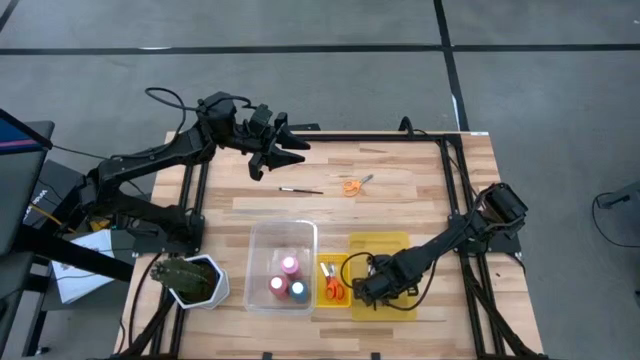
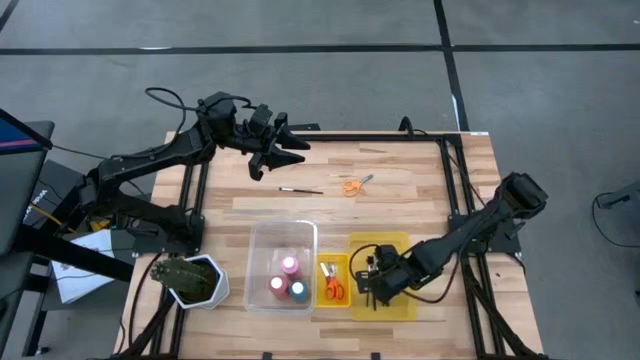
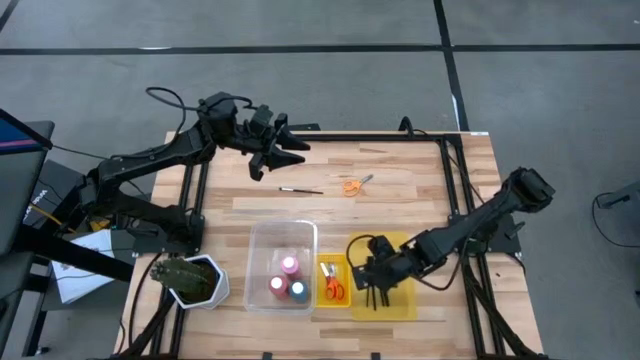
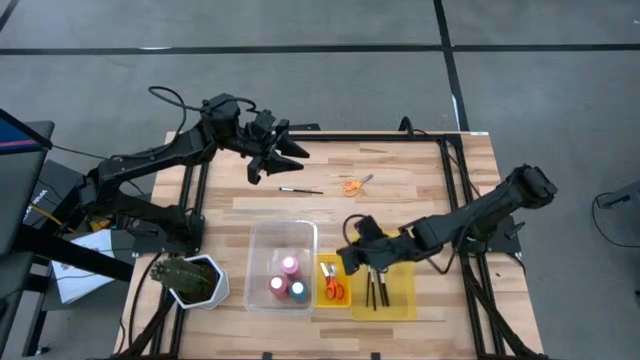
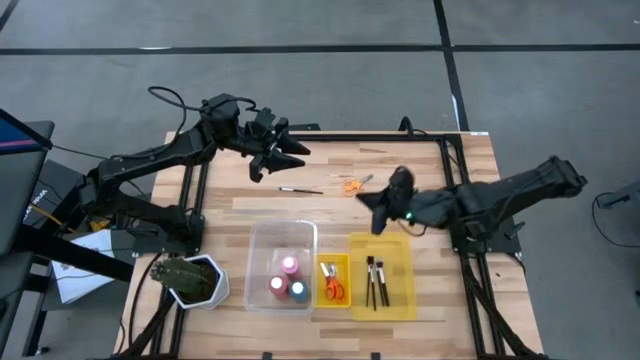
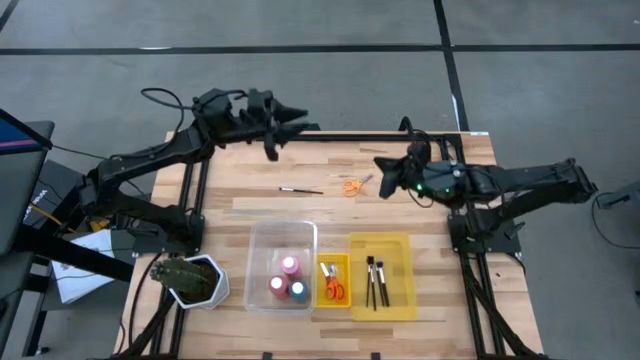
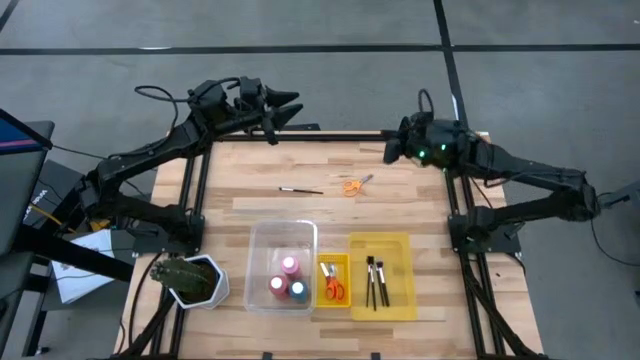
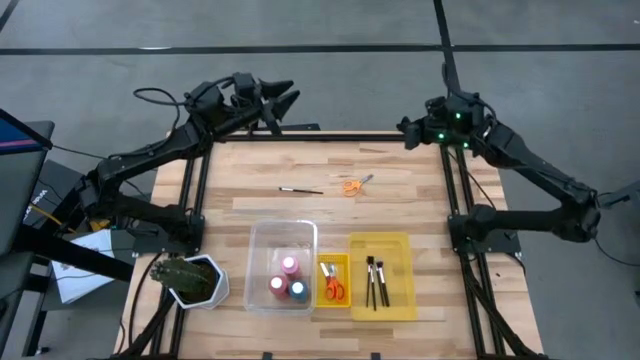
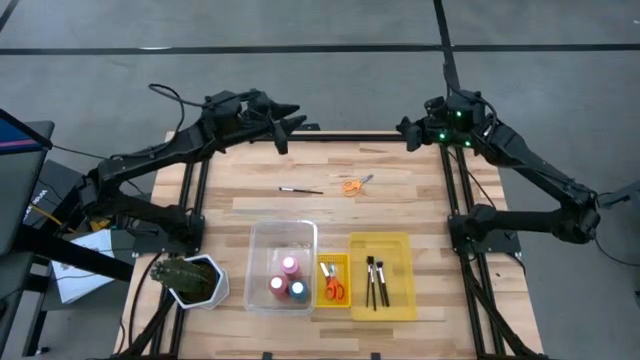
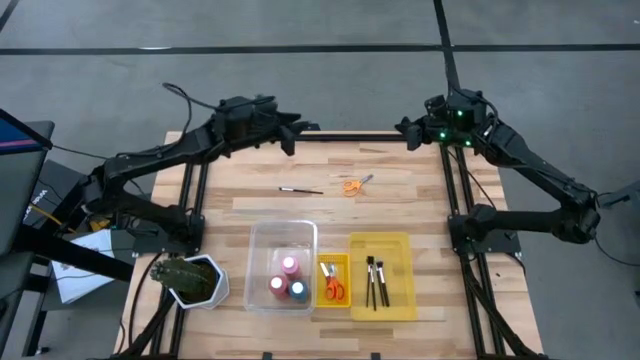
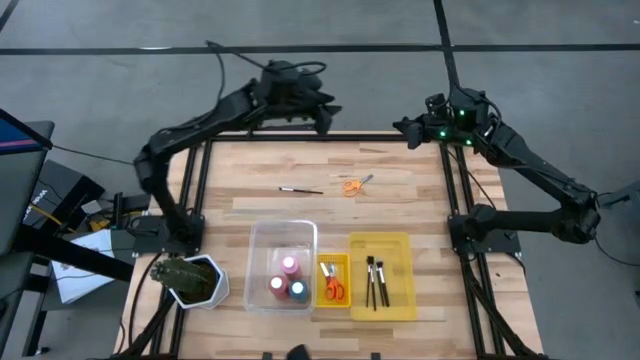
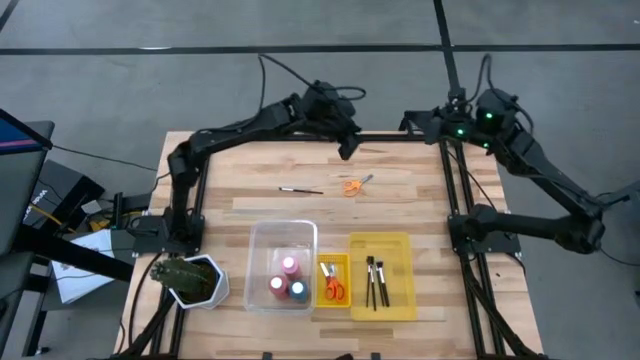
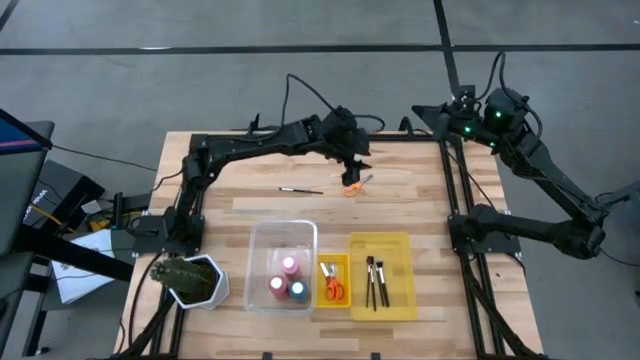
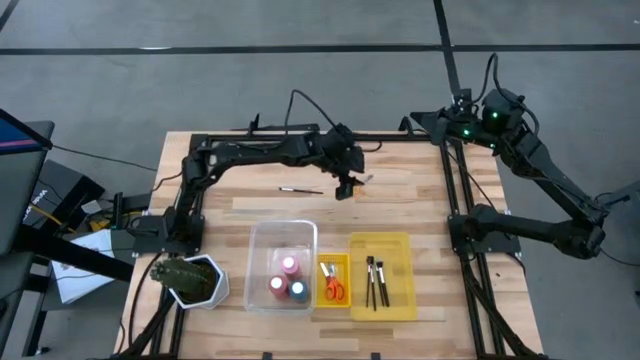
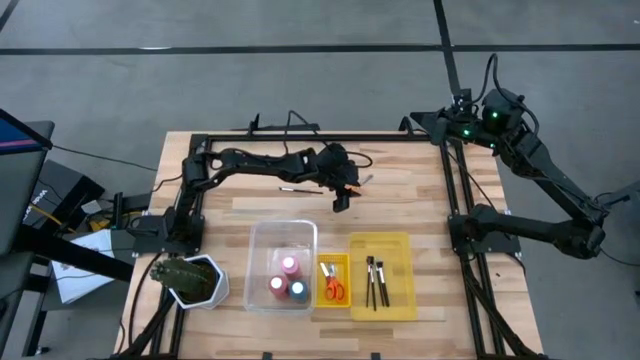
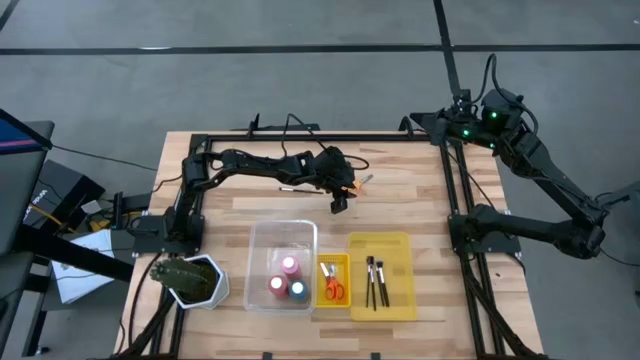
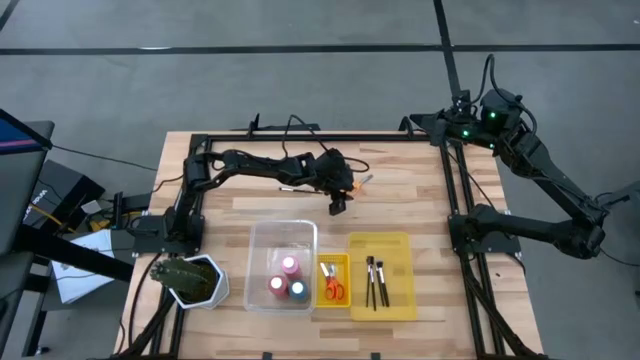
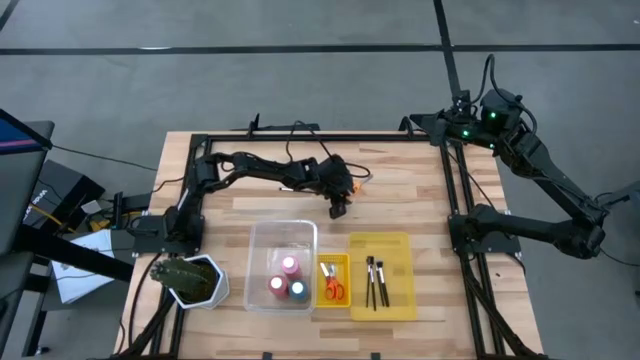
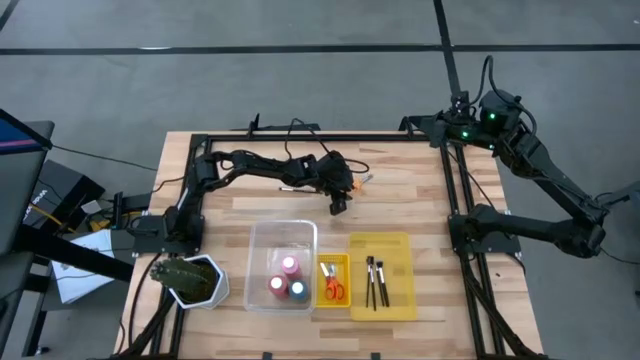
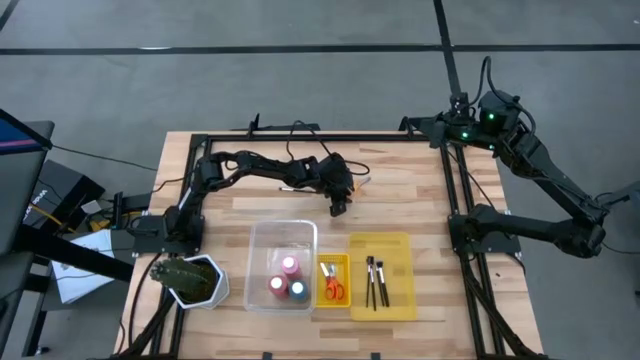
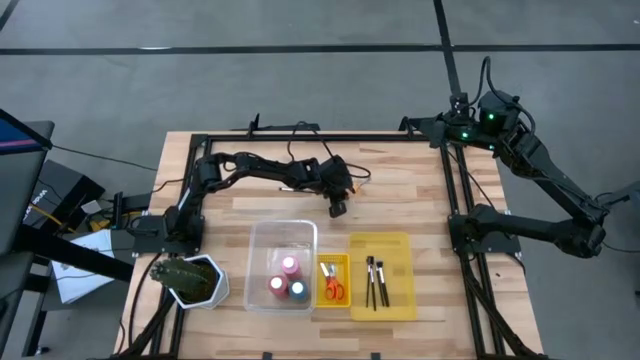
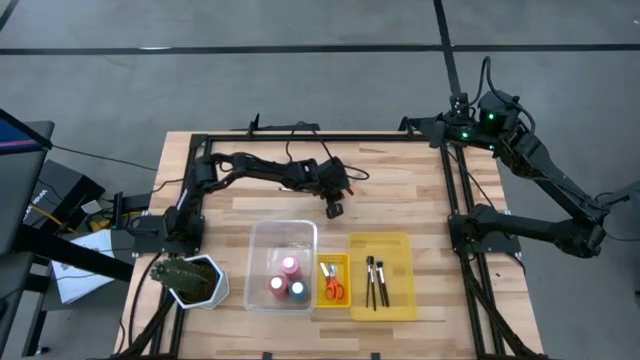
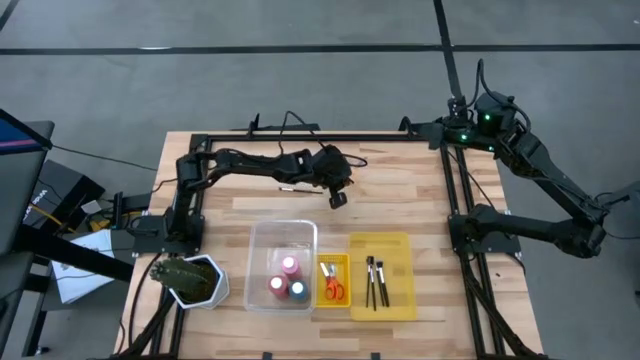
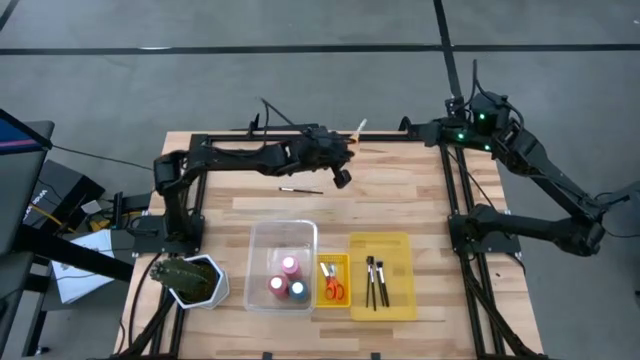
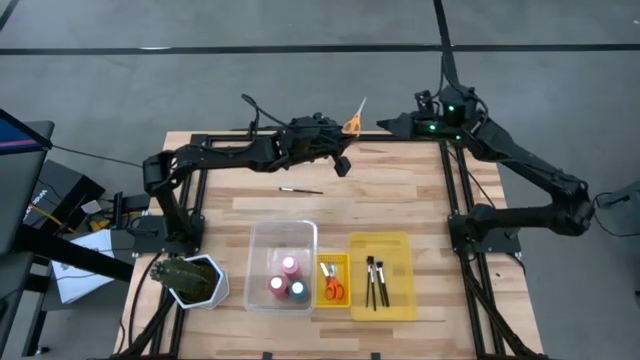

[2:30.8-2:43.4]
Task: Pick & Place Paint Supplies
Put the yellow scissors into the left yellow bin
